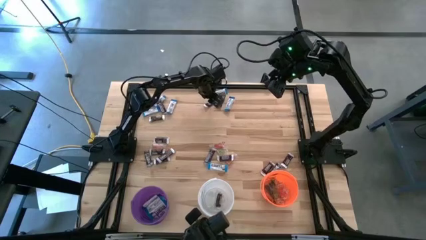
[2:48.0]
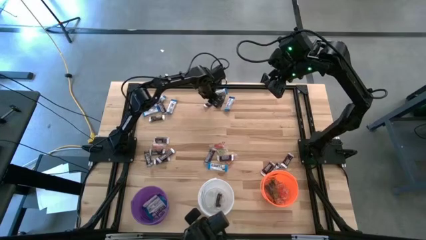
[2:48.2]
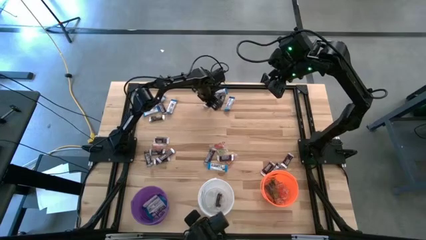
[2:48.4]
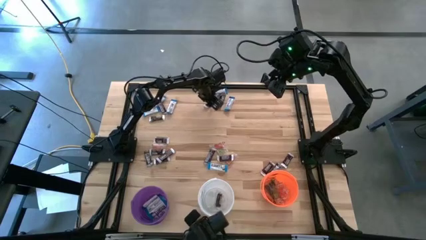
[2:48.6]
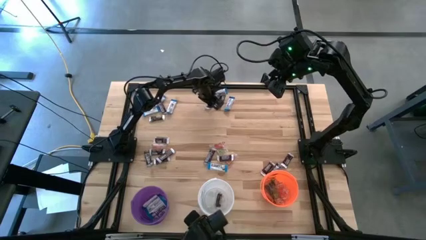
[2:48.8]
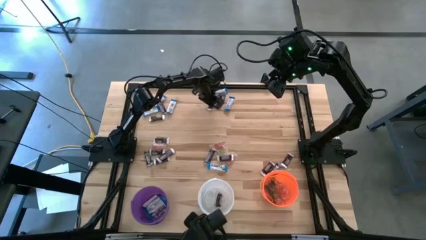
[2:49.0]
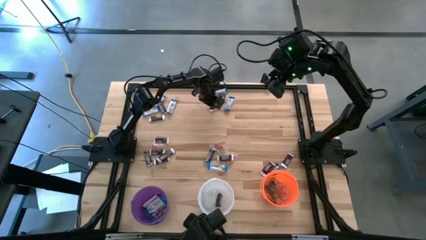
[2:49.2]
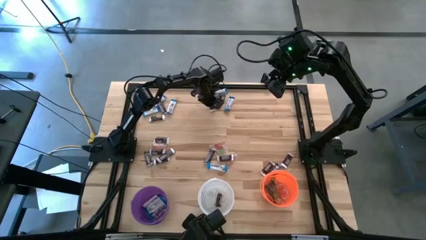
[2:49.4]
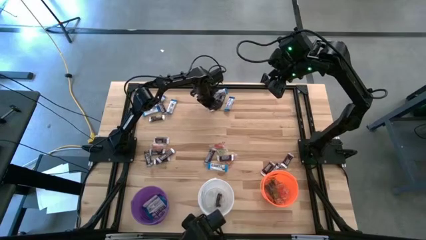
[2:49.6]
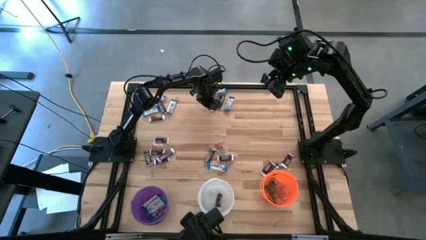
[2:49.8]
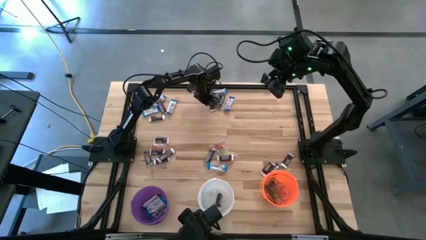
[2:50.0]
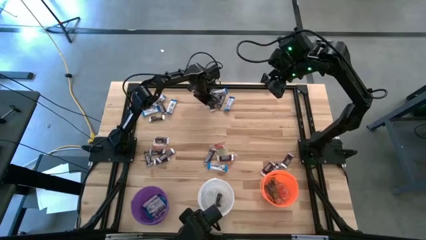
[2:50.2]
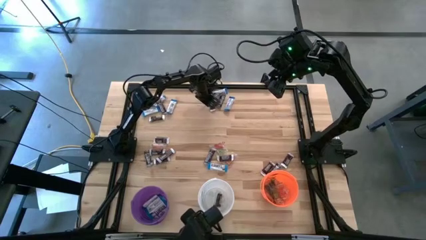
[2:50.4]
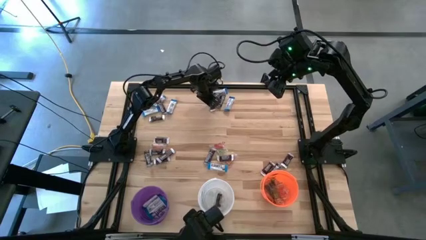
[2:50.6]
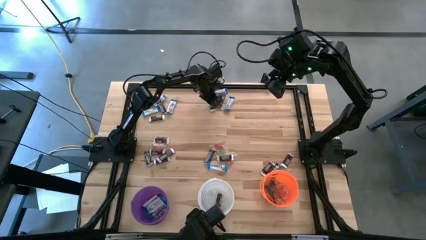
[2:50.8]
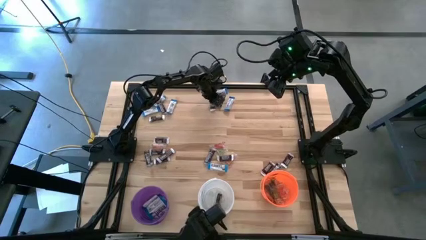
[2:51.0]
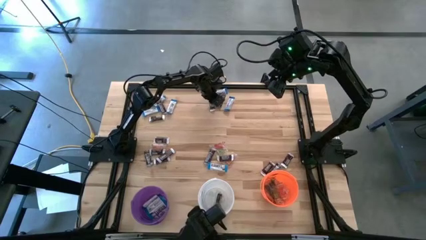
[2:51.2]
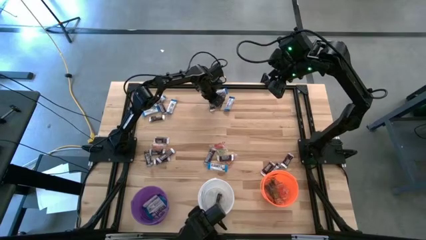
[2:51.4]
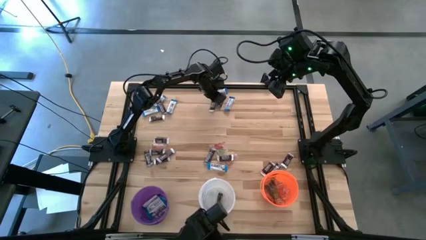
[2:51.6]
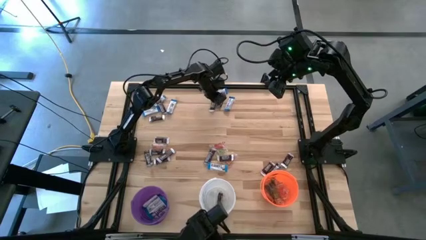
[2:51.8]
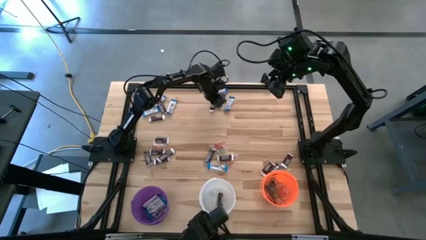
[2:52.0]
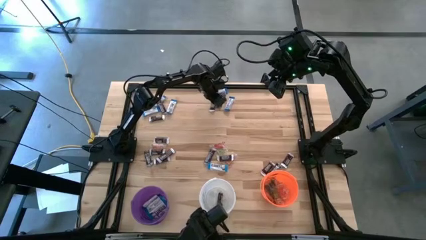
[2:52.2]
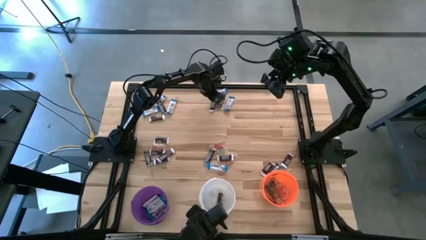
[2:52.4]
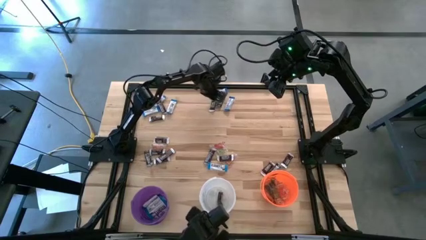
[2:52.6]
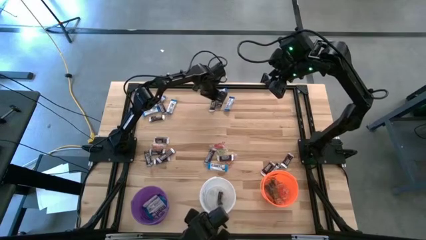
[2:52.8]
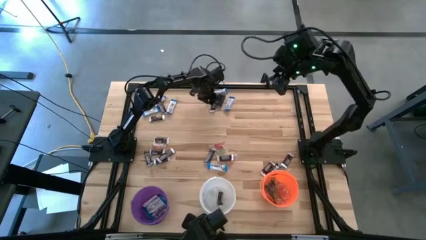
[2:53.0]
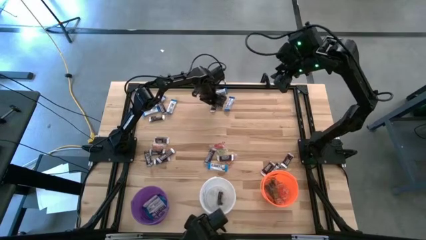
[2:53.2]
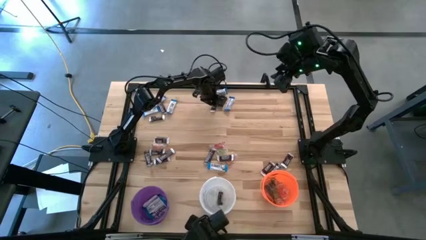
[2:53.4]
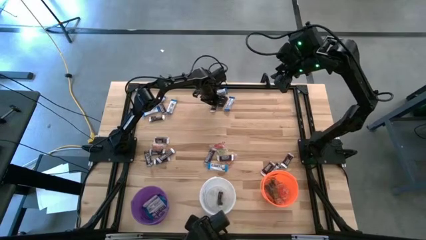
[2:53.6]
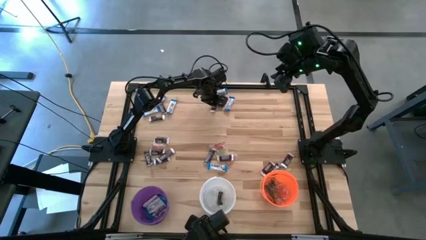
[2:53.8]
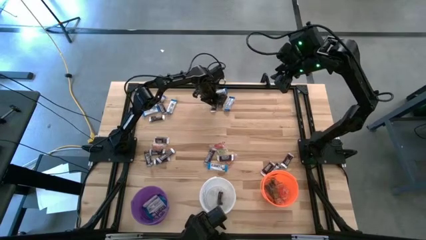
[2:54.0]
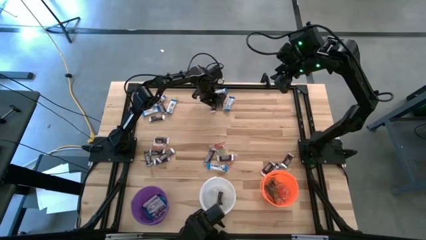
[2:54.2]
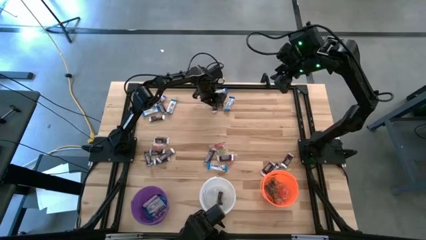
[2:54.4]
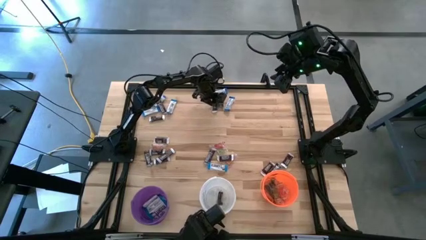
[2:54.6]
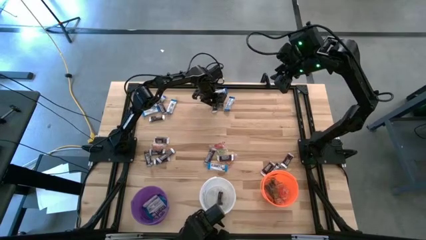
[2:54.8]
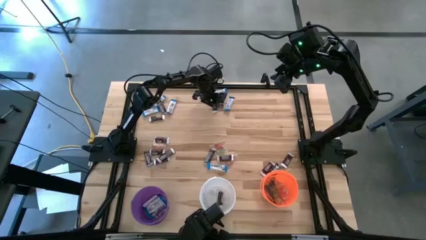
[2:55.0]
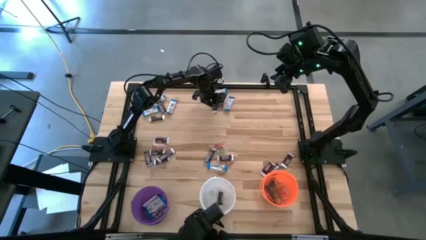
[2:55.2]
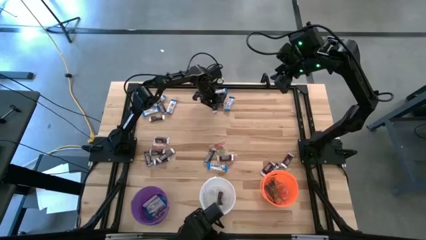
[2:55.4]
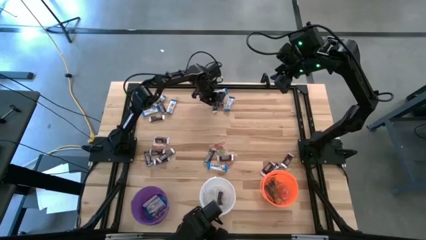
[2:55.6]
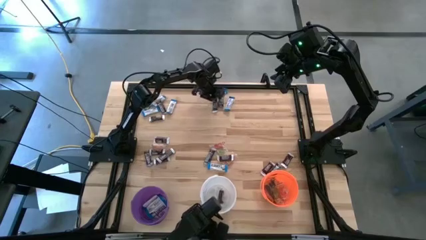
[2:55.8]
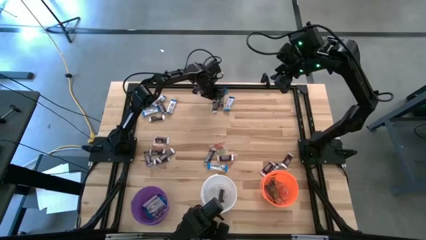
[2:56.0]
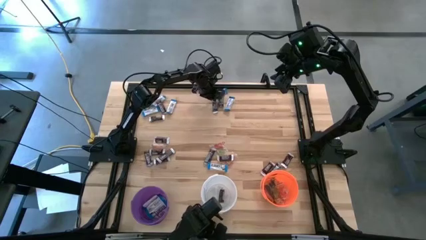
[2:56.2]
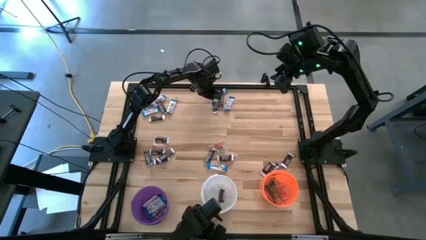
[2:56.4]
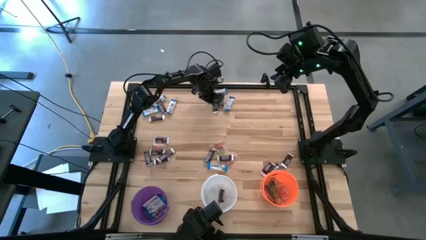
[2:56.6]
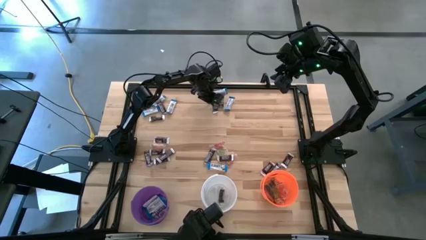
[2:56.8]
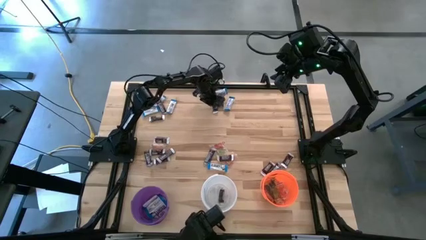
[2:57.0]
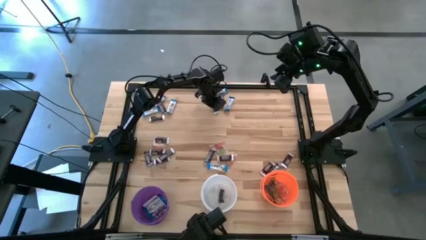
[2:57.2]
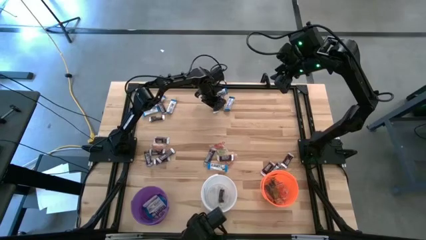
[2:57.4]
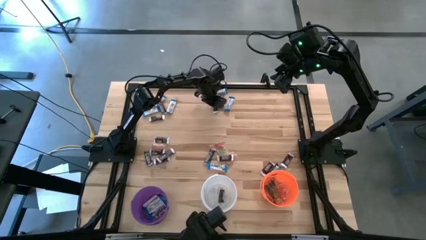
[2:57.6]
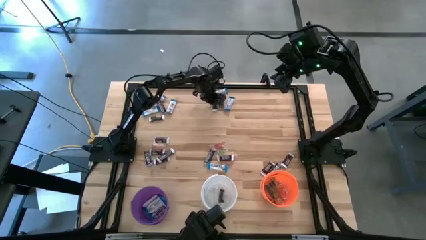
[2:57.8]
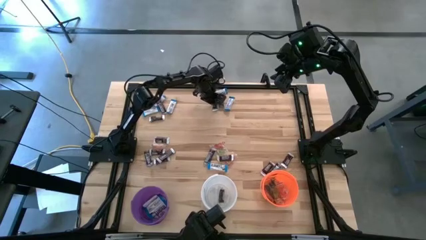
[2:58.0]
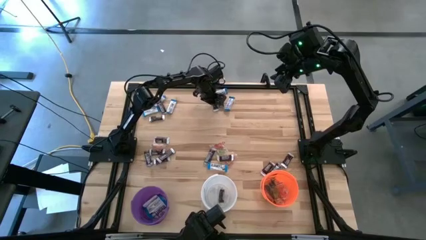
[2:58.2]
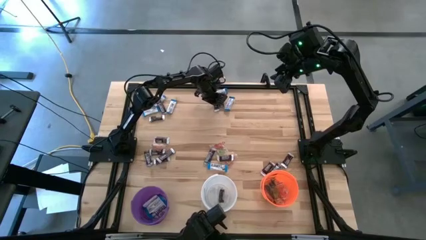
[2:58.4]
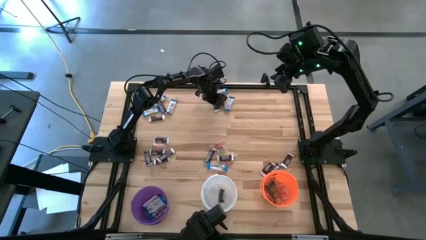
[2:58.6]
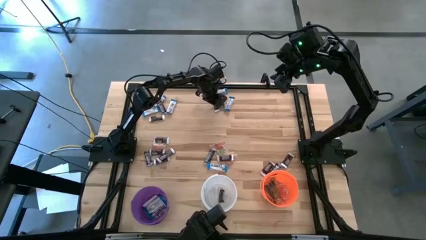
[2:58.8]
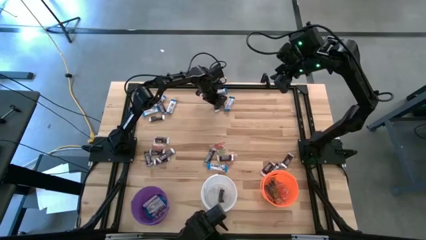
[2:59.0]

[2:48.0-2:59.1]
Task: Sort candy
Put the brown chocolate into the white bucket

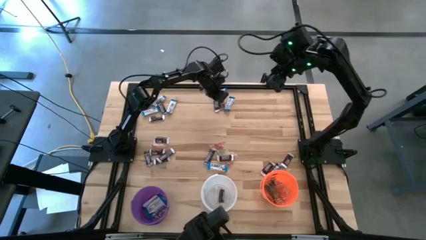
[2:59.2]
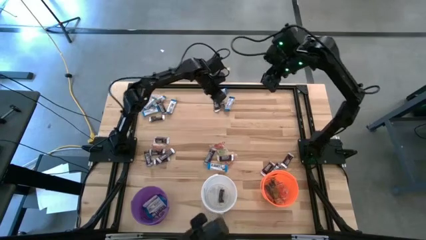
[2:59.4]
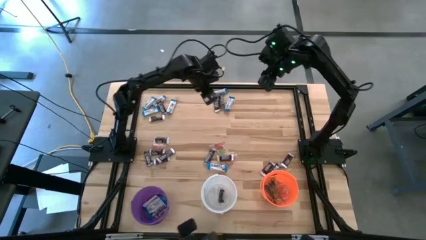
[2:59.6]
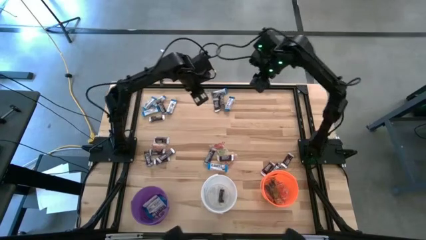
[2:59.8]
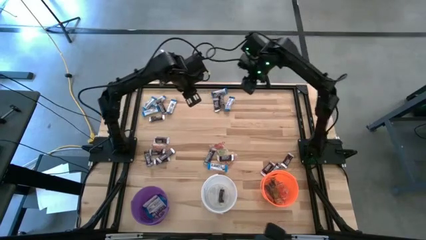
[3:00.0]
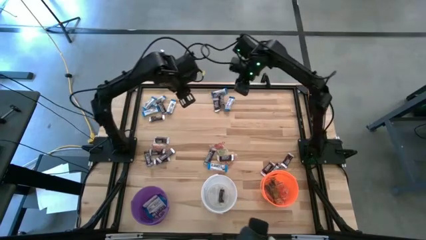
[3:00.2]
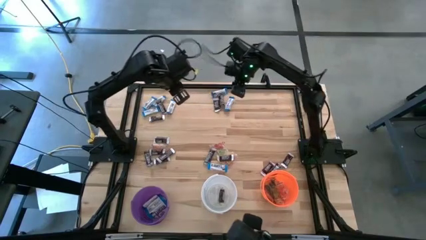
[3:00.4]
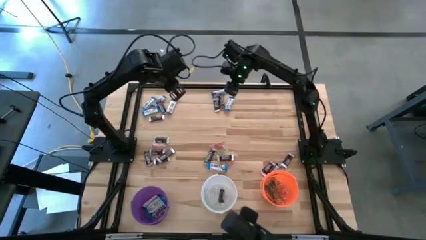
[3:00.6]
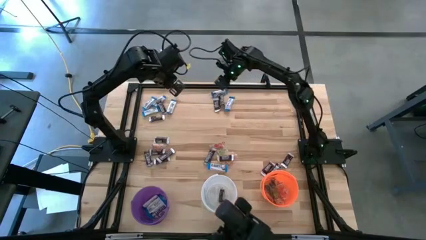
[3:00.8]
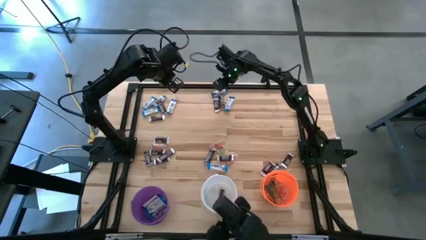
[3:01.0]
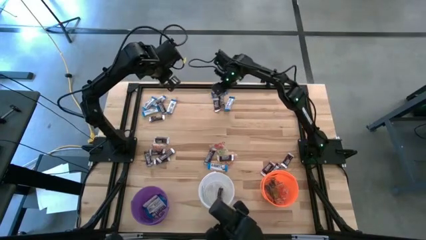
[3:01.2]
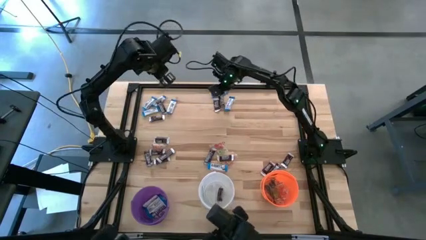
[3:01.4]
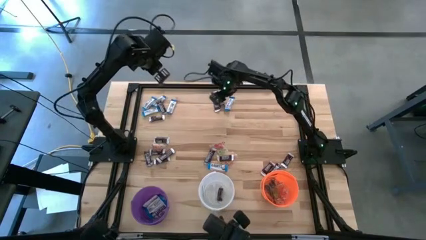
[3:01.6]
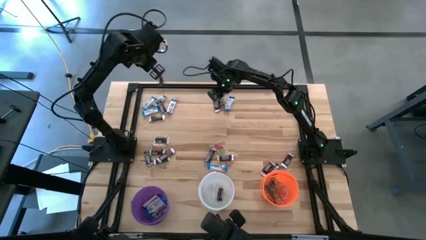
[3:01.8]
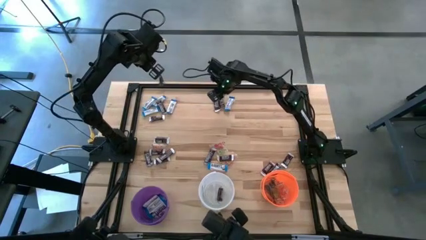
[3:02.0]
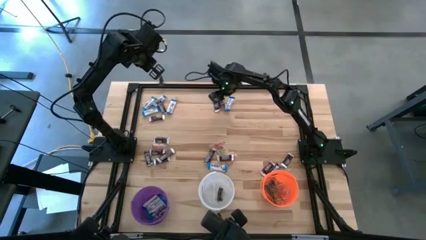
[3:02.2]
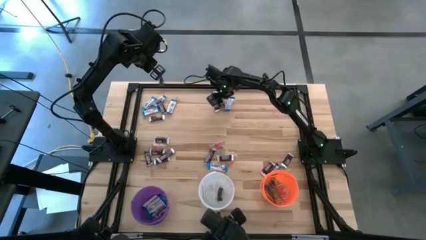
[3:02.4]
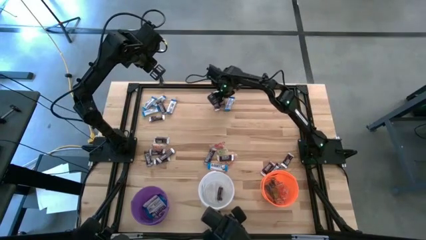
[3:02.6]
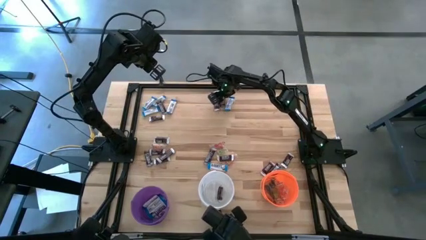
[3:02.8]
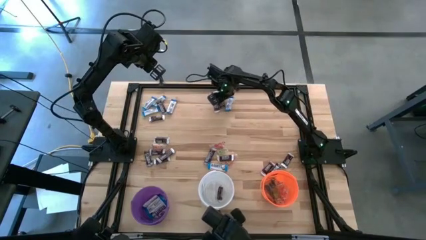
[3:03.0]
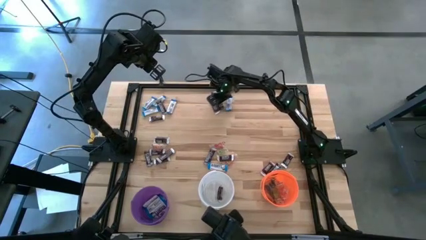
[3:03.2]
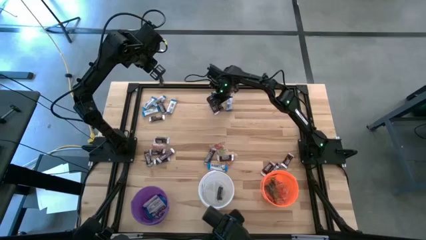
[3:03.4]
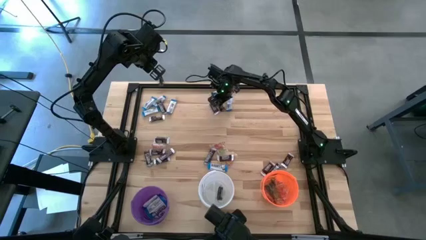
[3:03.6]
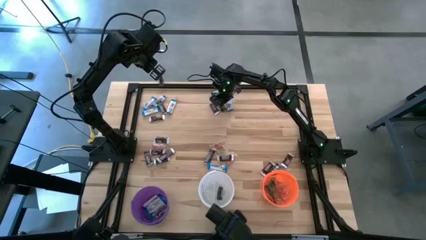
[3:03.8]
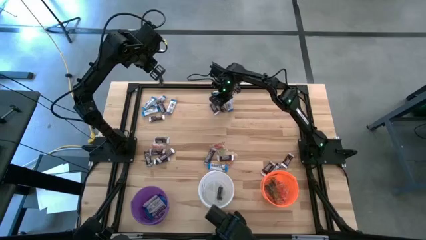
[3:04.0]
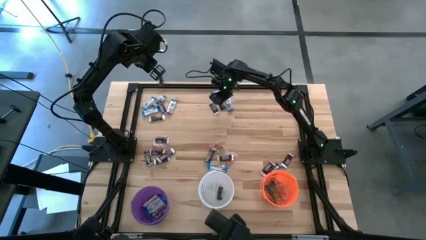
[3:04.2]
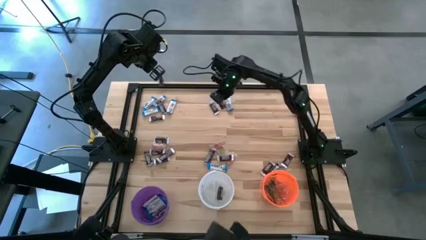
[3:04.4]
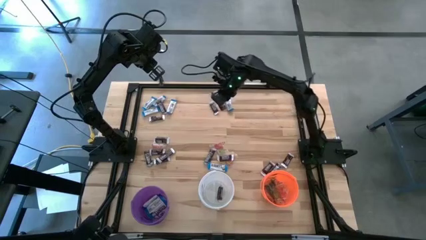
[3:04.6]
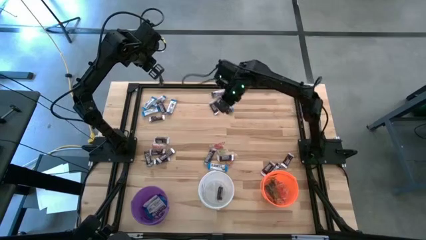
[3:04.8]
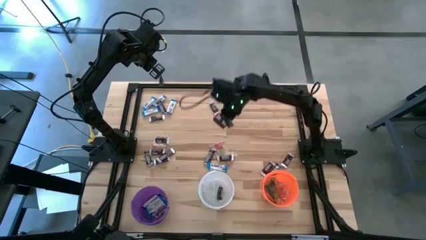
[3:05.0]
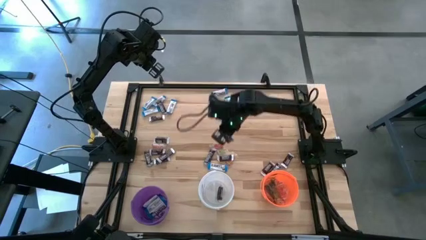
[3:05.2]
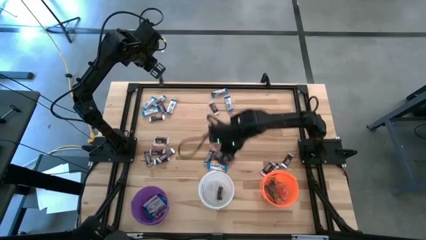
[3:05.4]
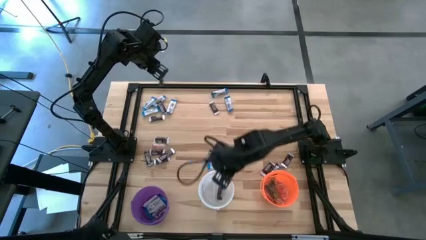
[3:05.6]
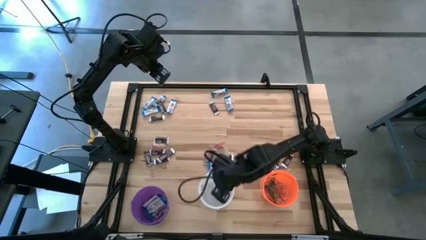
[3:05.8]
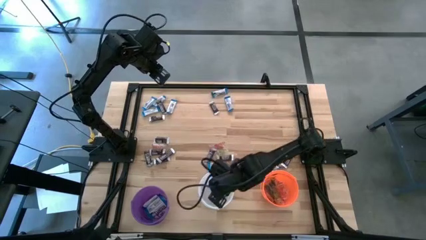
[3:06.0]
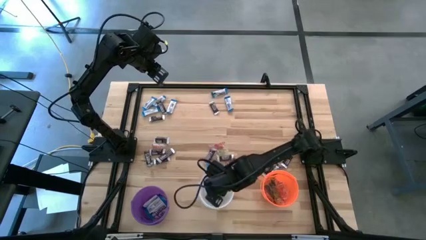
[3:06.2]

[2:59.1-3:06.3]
Put the brown chocolate into the white bucket
